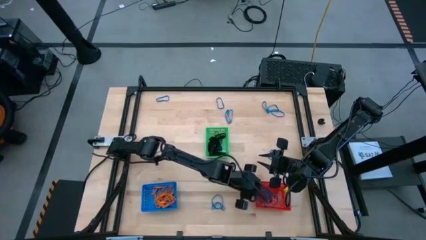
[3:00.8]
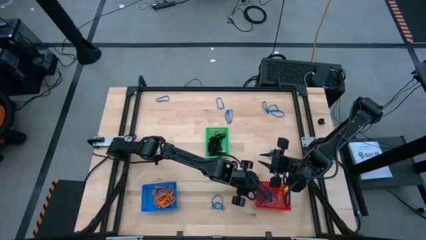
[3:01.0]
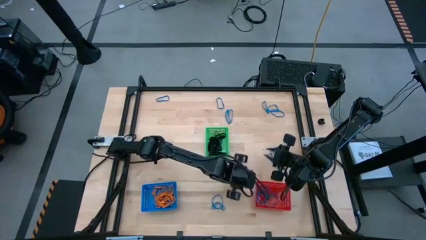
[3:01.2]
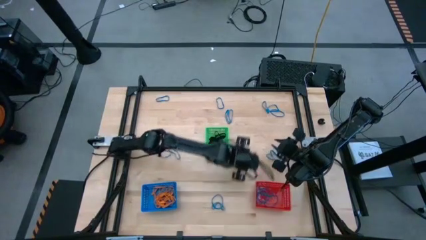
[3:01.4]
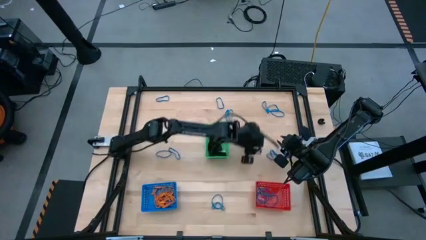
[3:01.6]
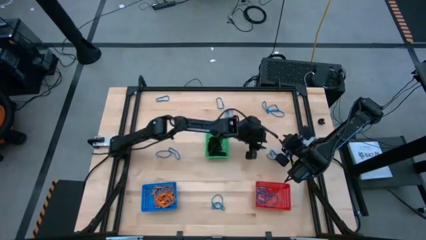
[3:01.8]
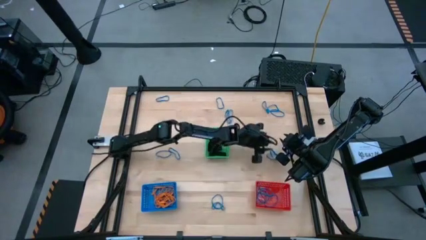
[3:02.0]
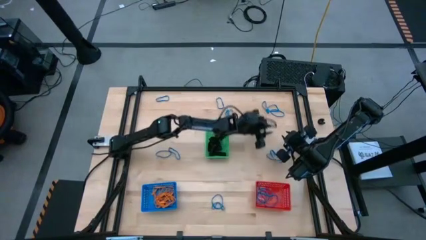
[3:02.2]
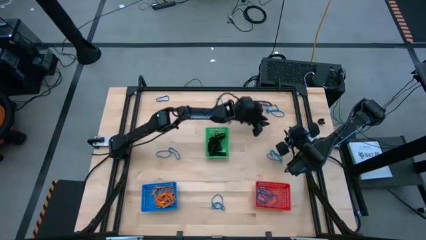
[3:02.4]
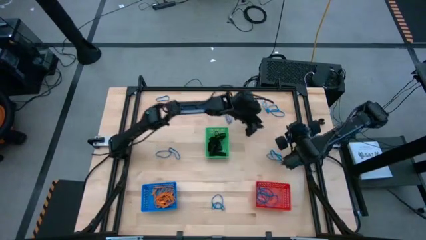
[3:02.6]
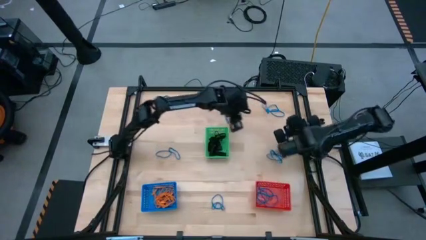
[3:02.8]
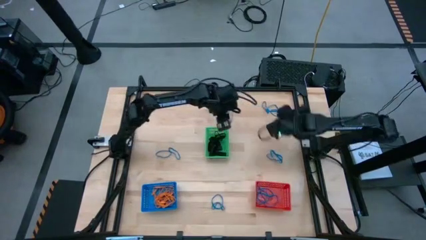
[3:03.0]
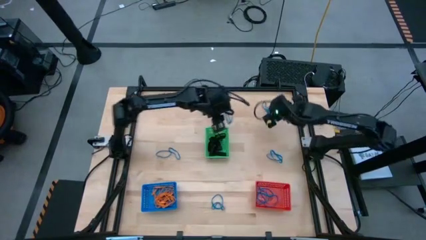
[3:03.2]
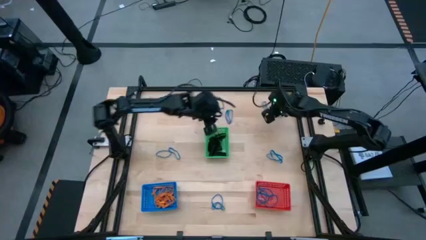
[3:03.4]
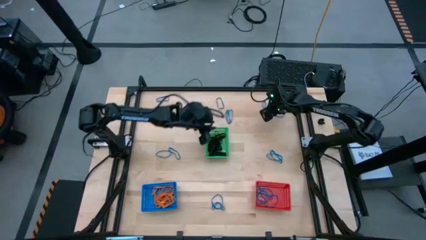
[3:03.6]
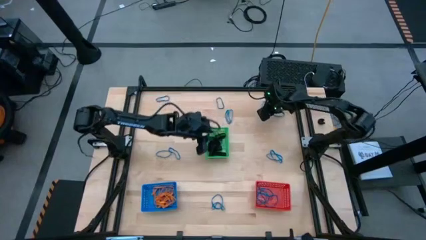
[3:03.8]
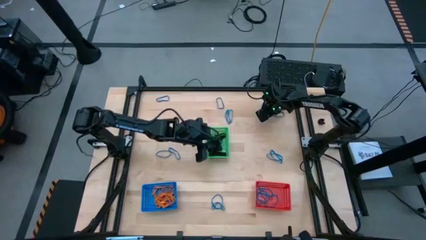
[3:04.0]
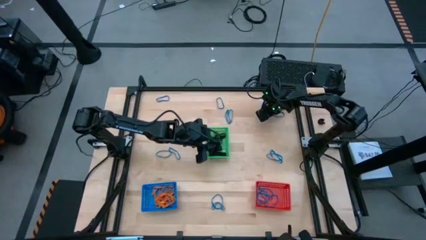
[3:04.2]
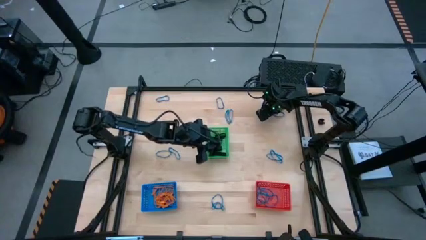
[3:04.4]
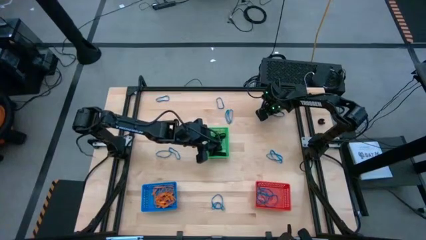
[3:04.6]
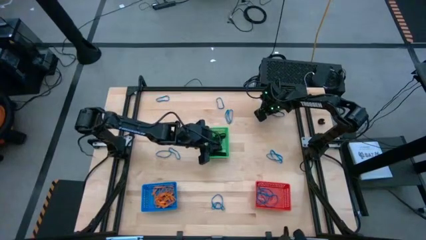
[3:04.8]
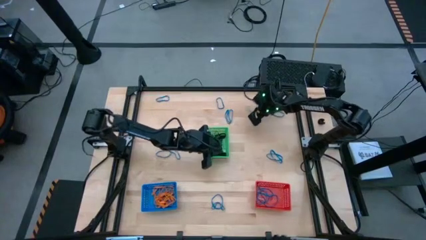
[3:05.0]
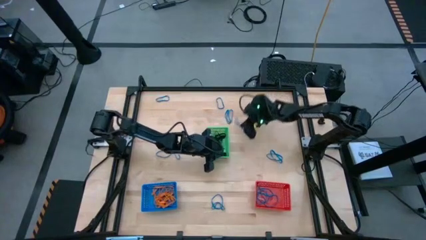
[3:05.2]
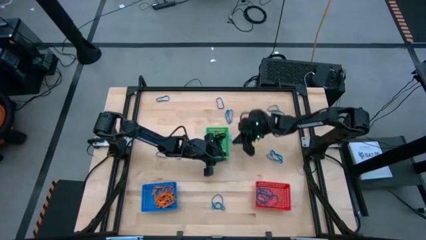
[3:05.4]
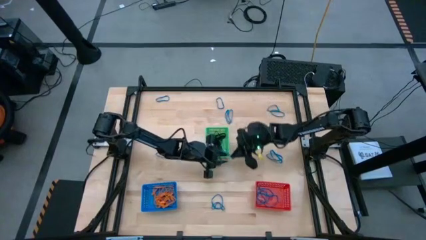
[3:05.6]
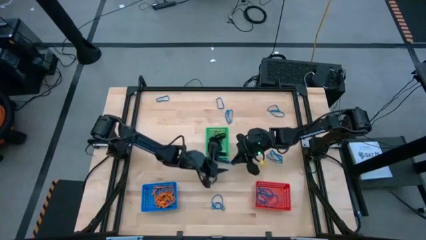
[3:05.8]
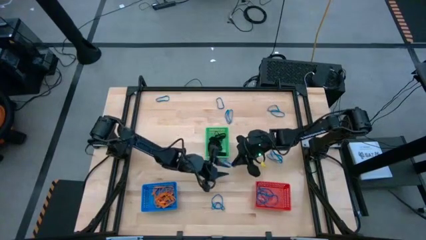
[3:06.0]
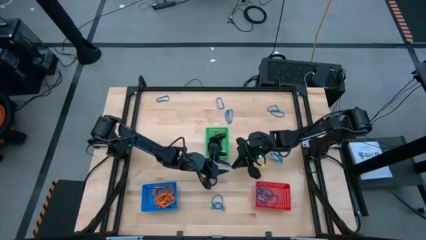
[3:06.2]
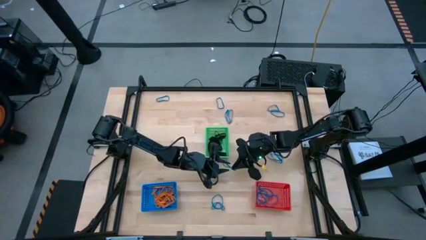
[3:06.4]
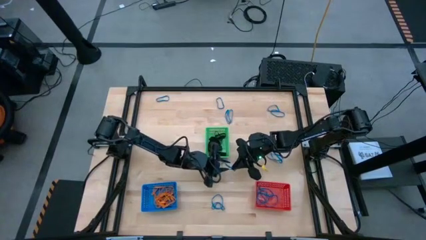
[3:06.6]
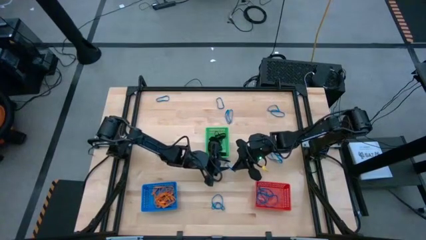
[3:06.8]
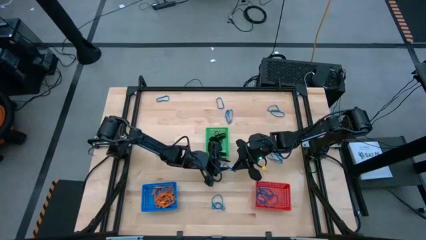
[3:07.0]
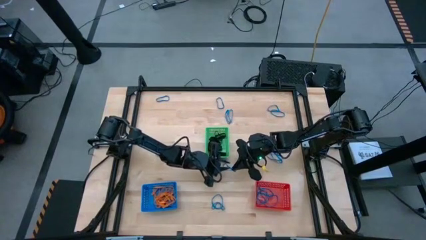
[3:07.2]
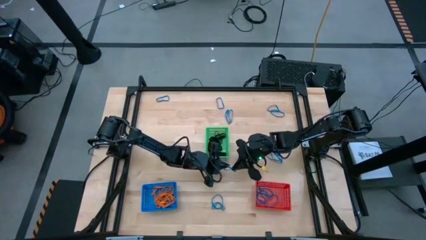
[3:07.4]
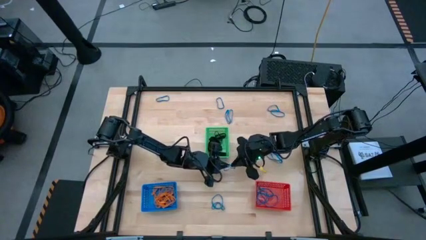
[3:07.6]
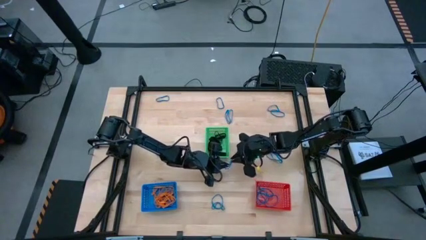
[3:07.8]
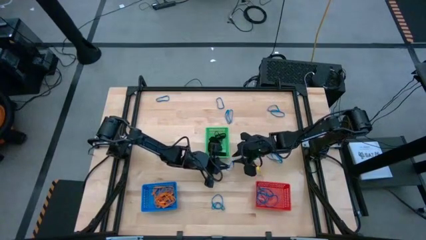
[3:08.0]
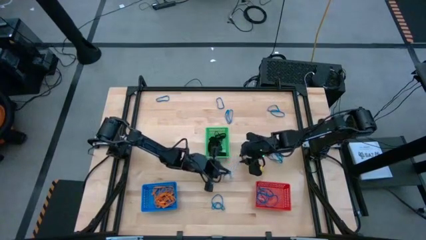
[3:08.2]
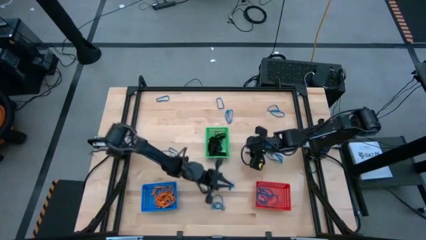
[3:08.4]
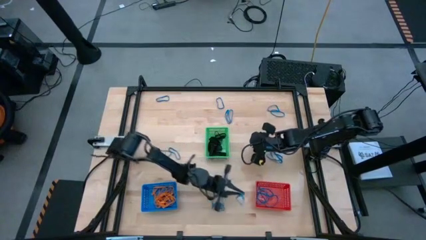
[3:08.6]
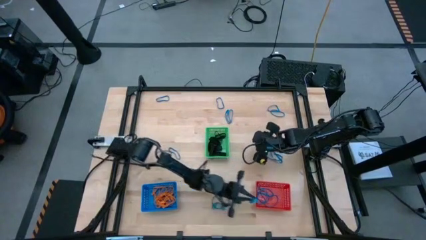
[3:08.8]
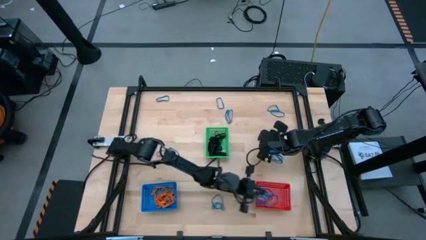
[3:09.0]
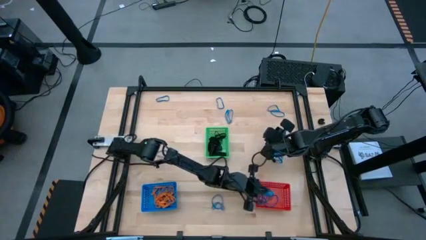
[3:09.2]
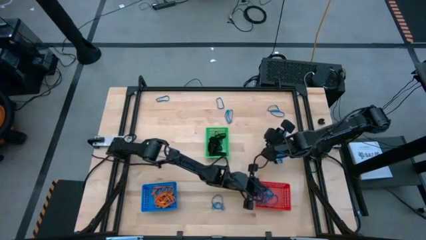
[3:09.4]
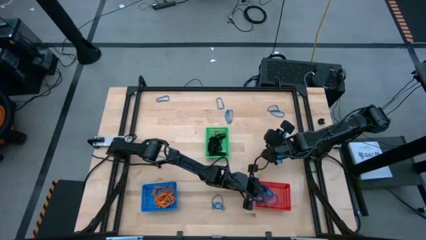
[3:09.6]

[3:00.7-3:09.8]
Task: Sort rubber bands into baskets
Put the blue rubber band into the red bin

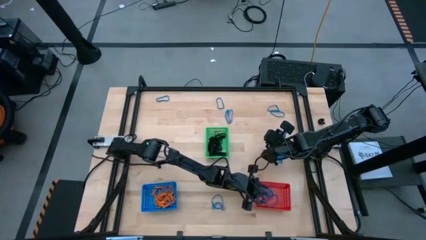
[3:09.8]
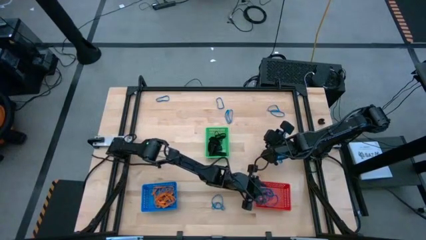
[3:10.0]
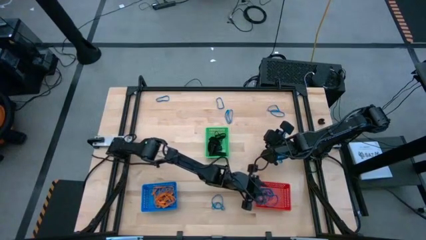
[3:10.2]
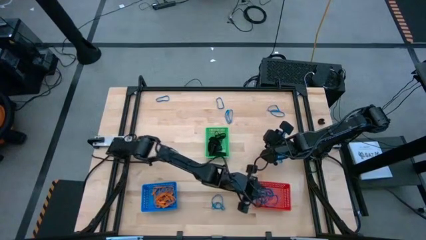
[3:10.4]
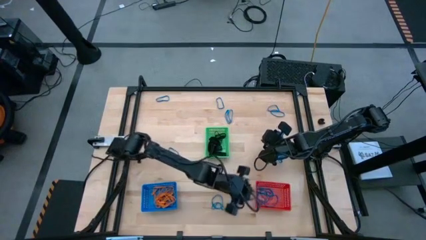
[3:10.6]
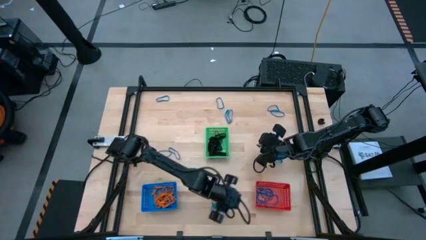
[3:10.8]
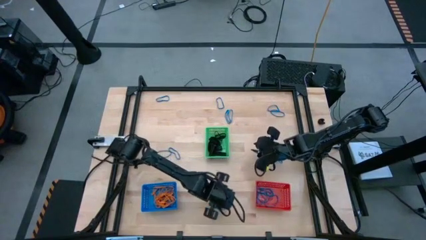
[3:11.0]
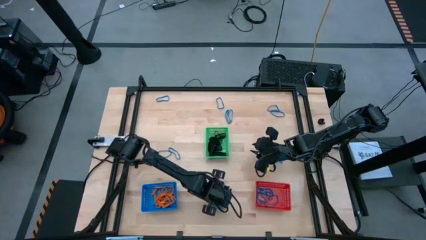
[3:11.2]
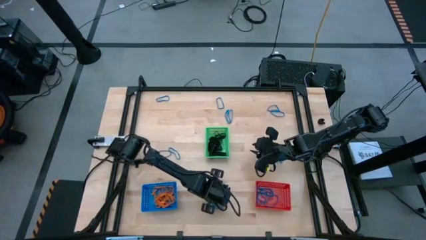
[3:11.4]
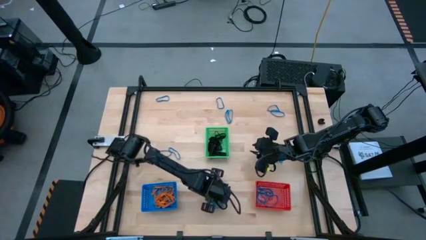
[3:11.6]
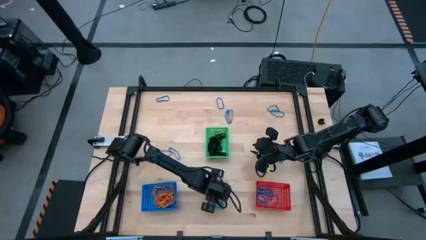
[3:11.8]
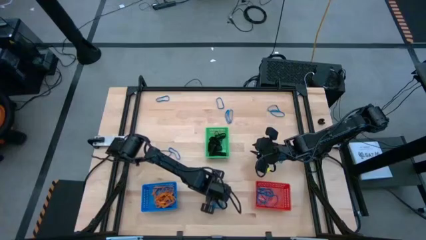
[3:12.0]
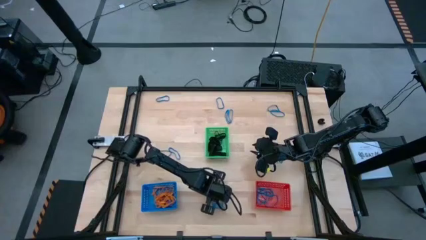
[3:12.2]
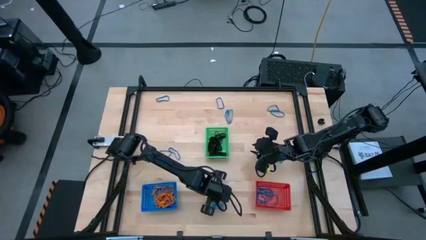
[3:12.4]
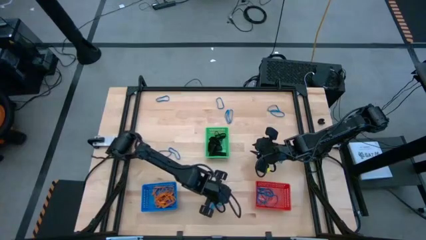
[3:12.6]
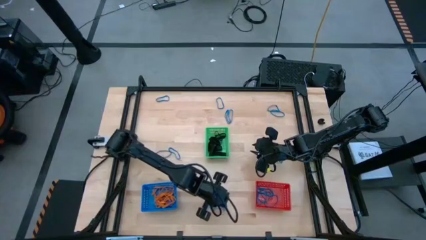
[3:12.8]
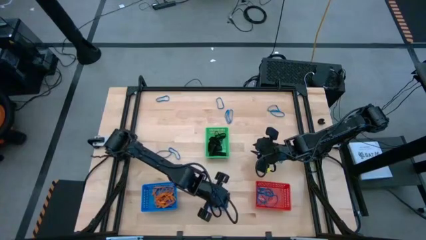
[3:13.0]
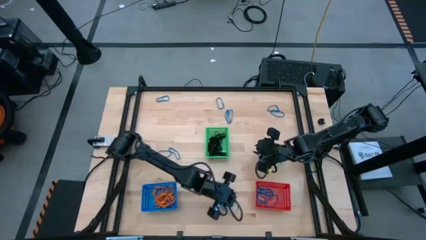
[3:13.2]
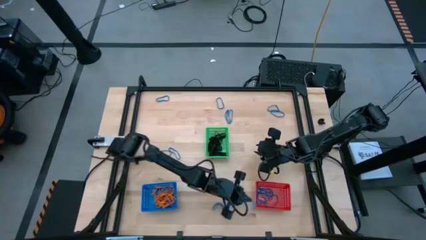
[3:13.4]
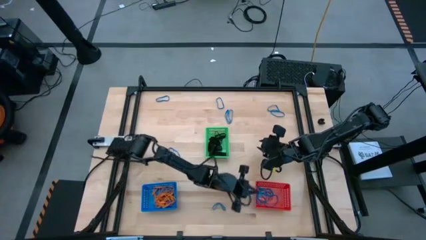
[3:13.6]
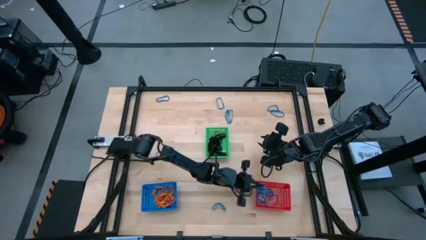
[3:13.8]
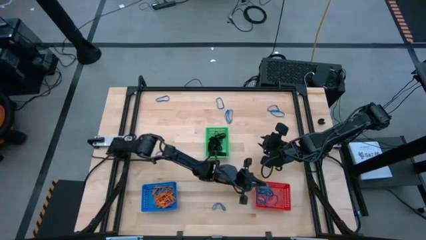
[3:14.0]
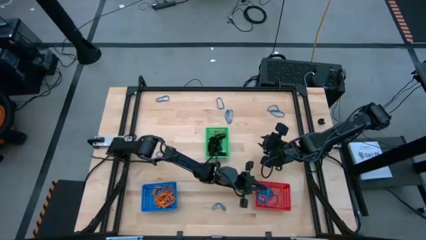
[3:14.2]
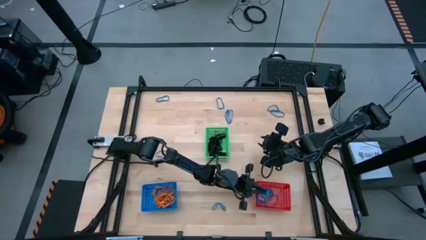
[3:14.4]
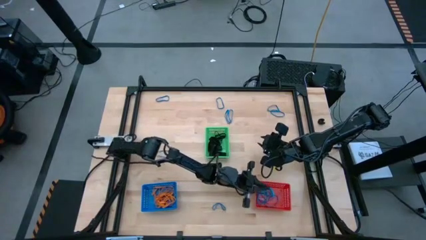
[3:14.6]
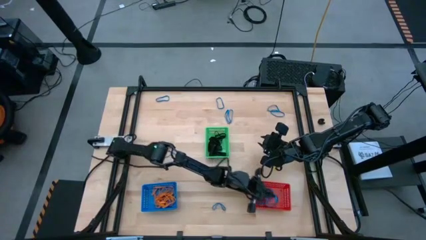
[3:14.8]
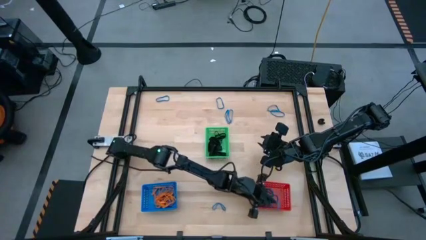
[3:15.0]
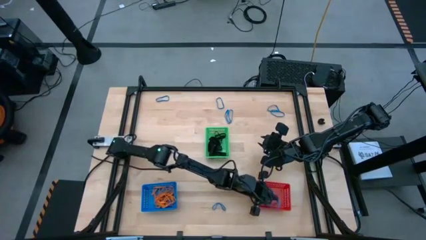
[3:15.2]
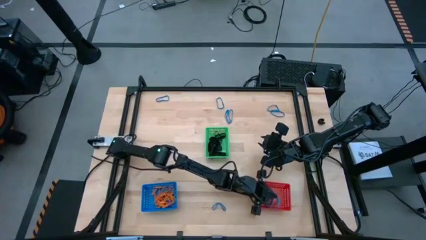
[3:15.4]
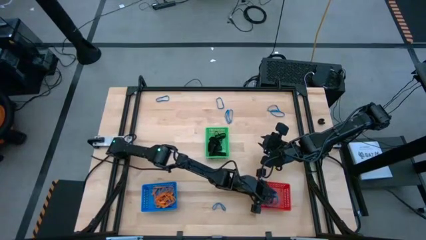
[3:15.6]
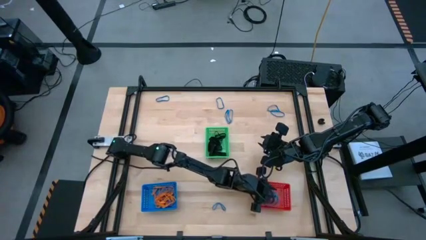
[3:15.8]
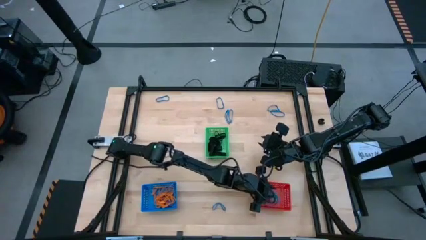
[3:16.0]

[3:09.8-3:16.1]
Put the blue rubber band into the red bin

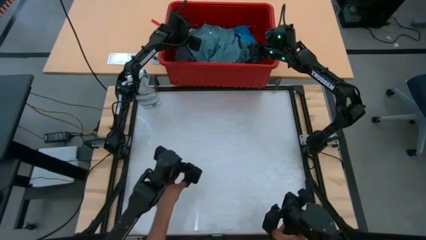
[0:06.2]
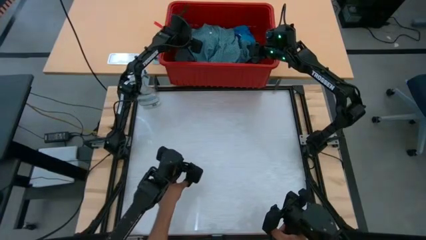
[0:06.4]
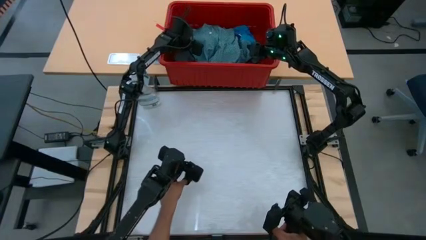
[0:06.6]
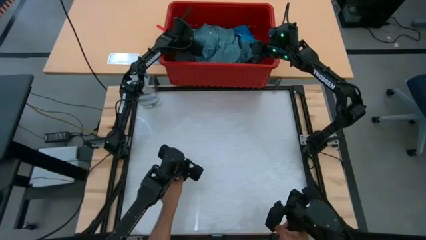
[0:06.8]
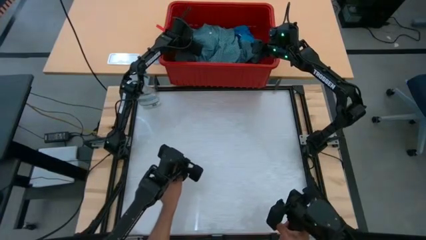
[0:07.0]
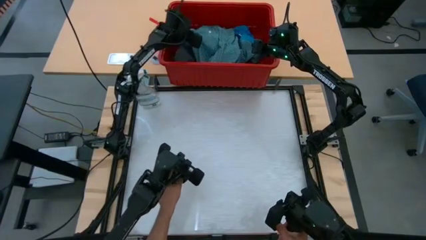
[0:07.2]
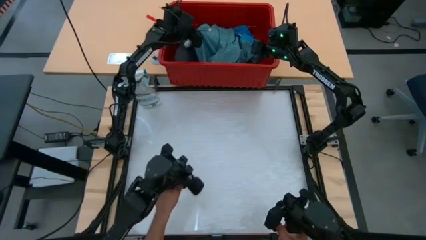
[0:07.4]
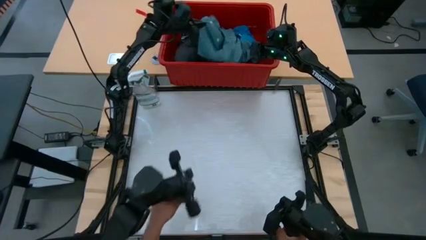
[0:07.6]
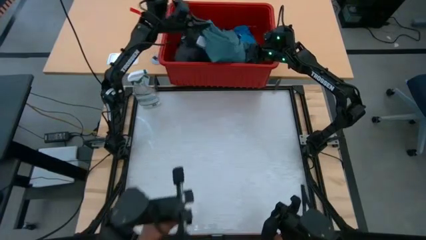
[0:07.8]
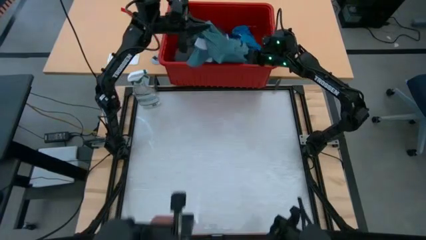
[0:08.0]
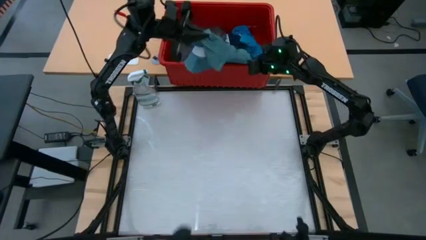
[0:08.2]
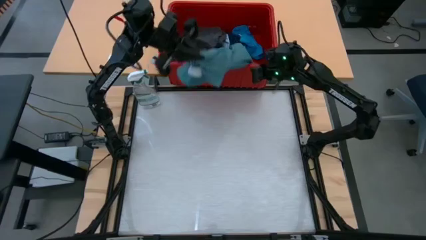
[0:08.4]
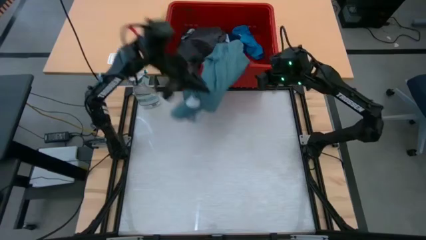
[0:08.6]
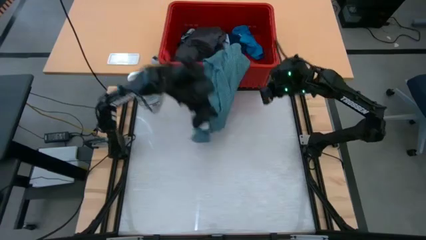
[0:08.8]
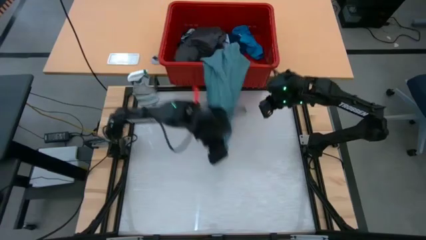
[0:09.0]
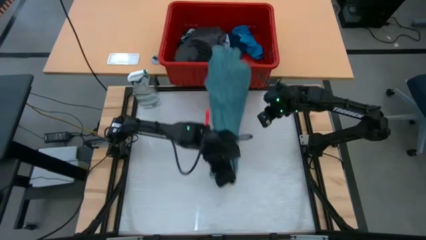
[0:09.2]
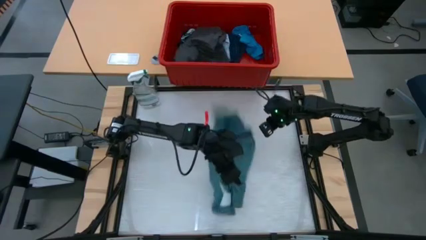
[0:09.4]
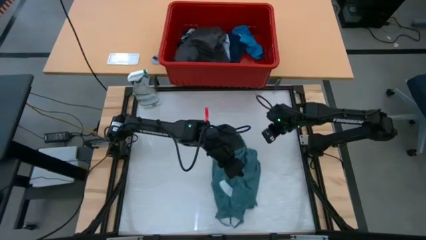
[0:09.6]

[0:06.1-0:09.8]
Task: Fold laundry
Remove the green shirt from the red bin
